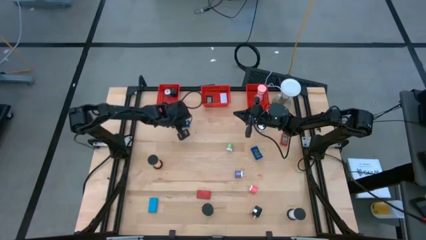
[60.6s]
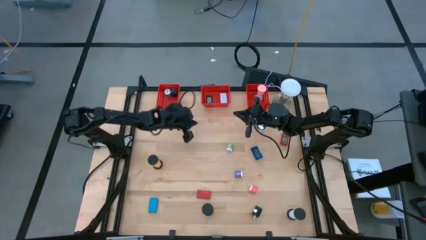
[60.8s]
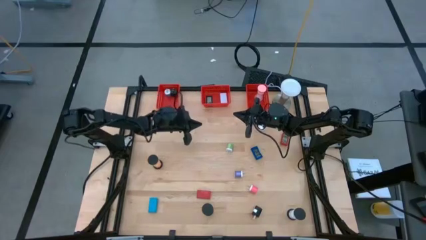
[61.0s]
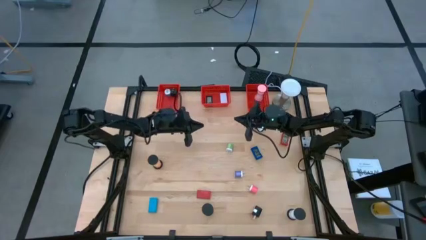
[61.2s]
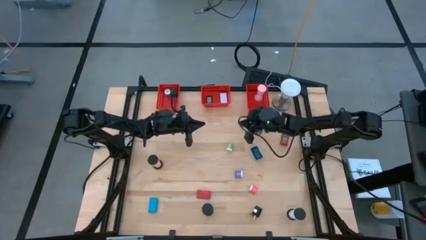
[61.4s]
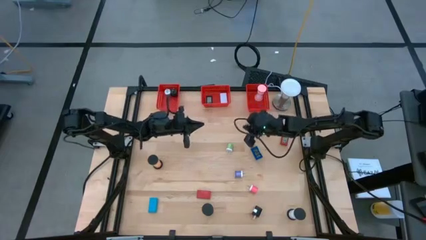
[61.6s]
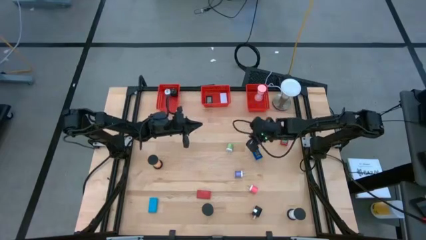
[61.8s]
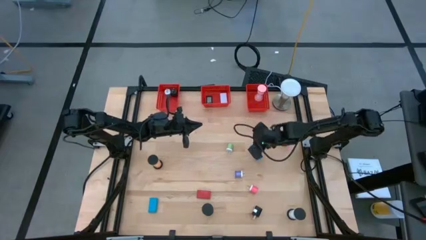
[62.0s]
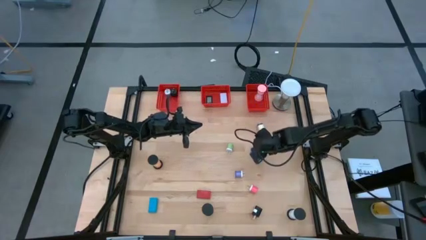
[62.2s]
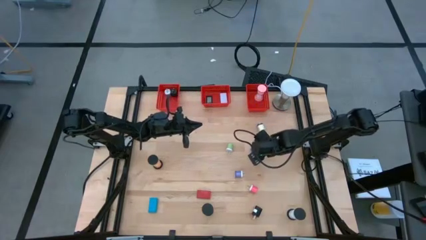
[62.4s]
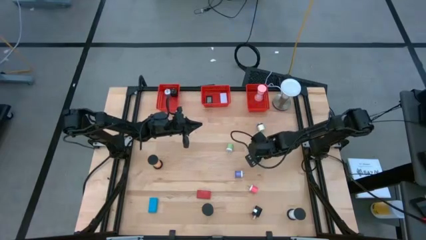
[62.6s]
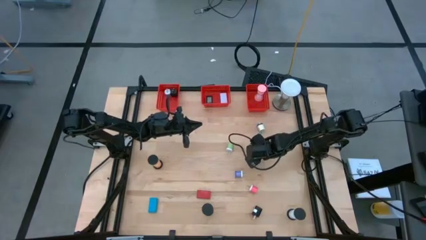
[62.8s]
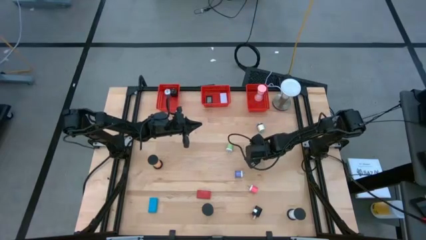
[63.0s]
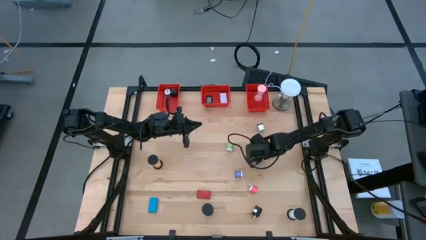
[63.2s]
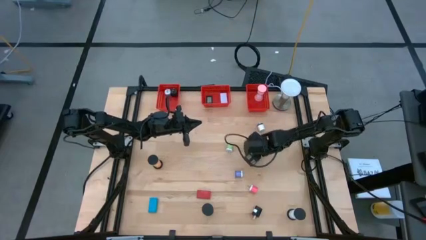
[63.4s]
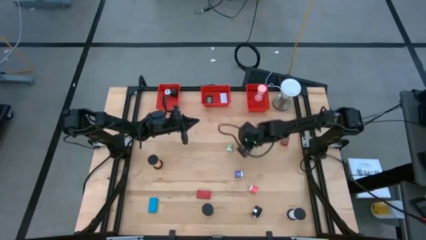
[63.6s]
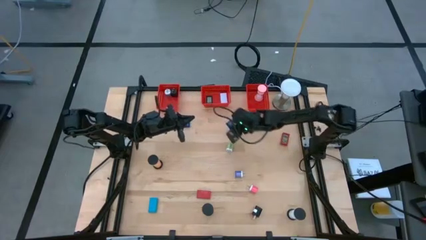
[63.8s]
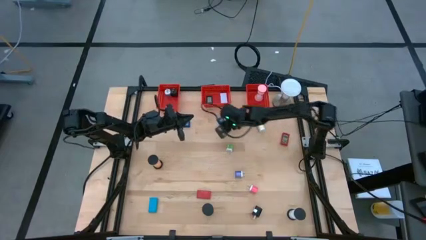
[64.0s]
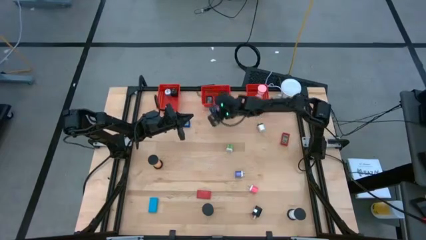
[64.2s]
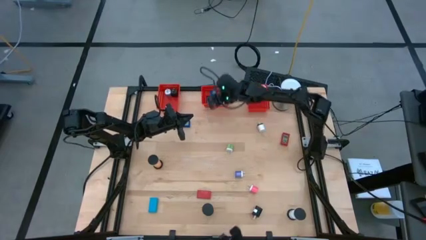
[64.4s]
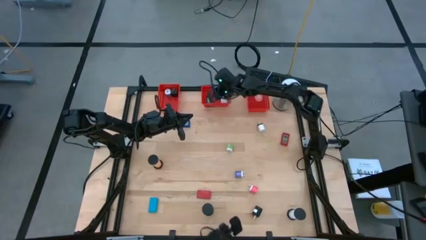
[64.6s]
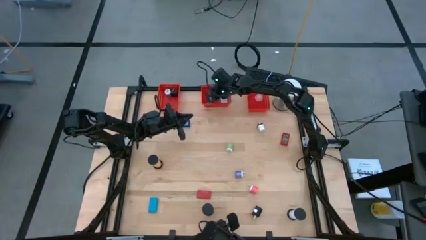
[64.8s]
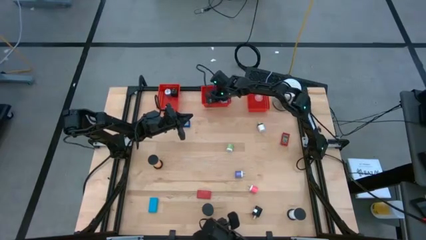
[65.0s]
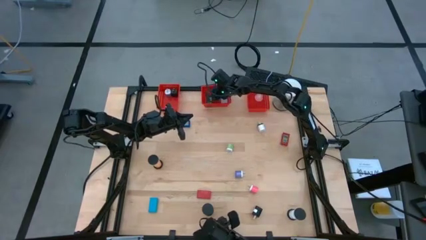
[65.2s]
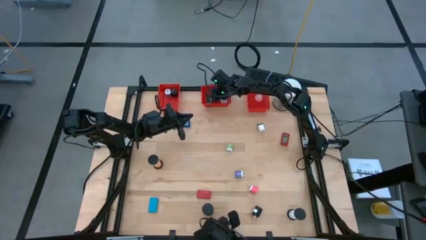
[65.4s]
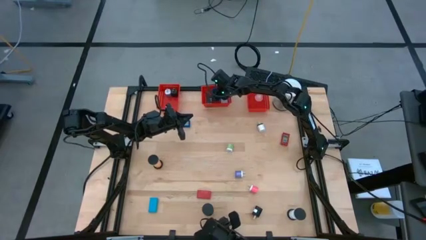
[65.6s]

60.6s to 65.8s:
Task: Pick & Place Office items
Put the blue digital clock into the middle red bin

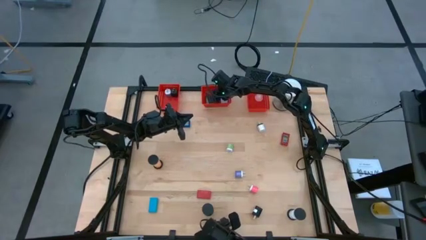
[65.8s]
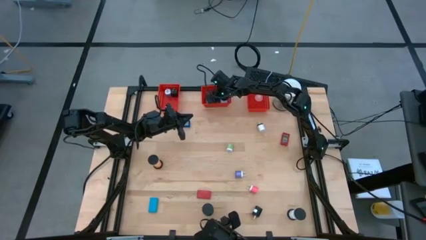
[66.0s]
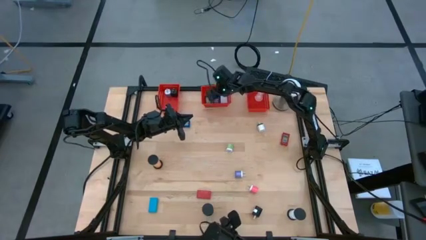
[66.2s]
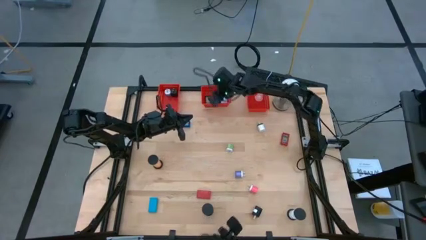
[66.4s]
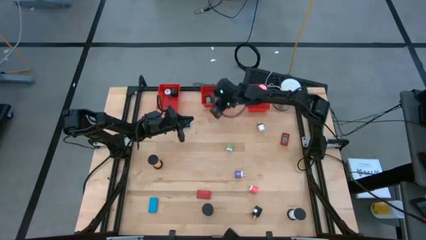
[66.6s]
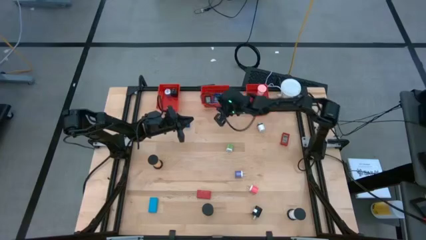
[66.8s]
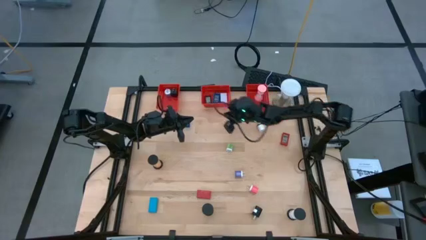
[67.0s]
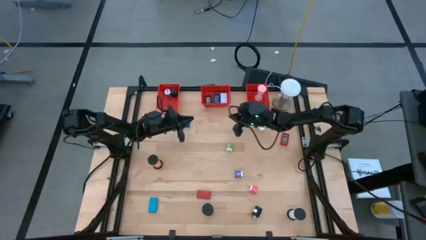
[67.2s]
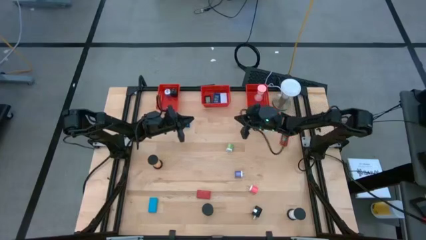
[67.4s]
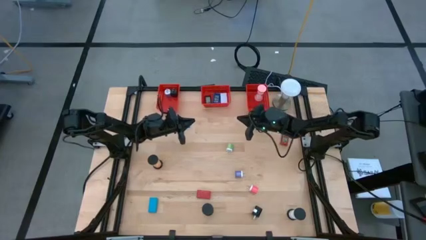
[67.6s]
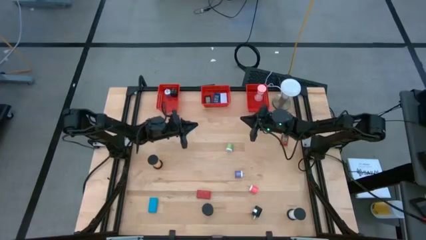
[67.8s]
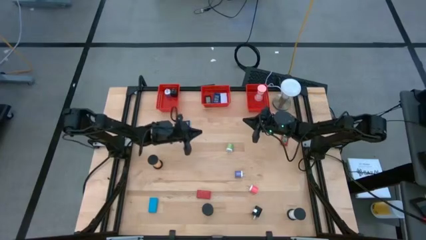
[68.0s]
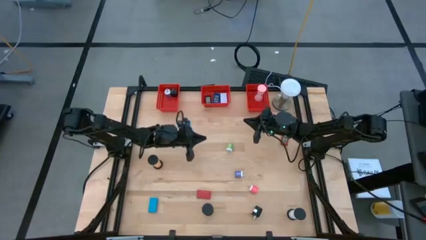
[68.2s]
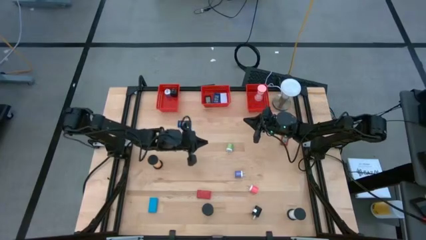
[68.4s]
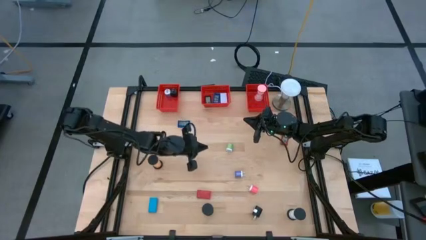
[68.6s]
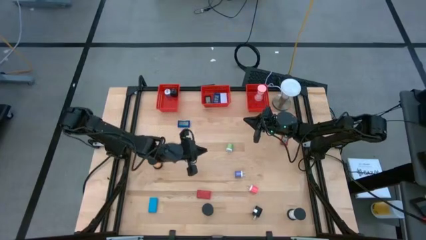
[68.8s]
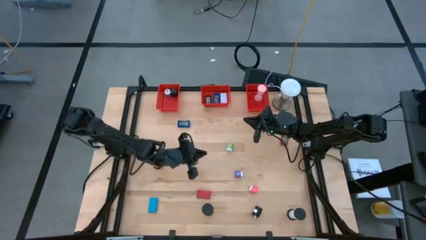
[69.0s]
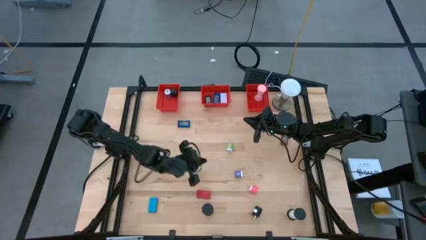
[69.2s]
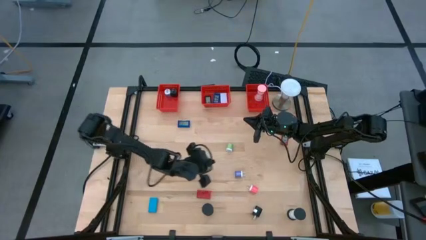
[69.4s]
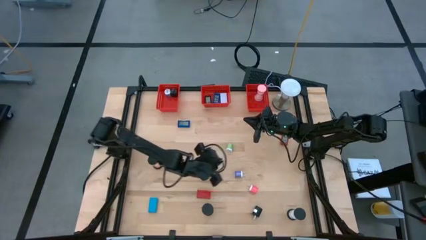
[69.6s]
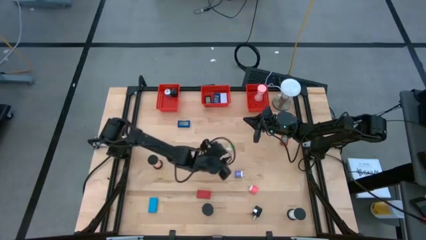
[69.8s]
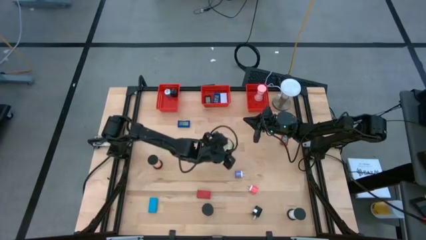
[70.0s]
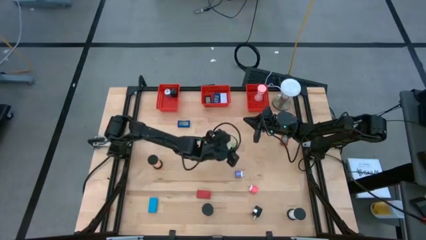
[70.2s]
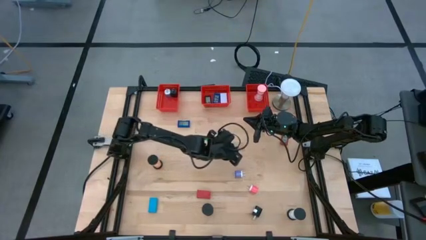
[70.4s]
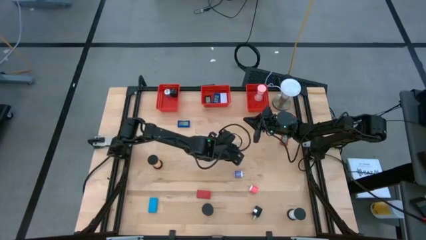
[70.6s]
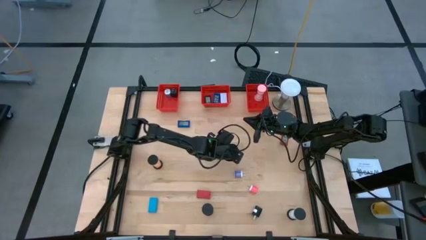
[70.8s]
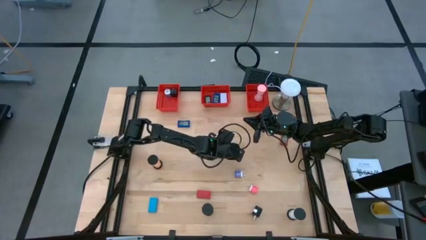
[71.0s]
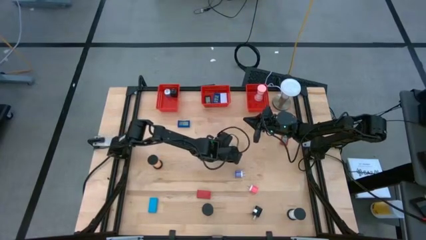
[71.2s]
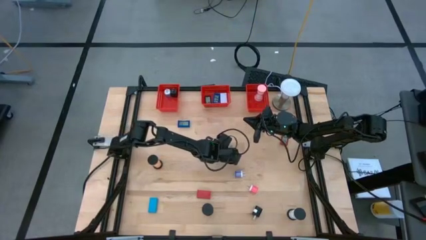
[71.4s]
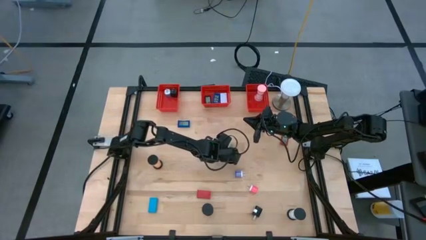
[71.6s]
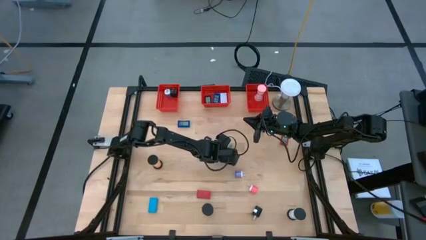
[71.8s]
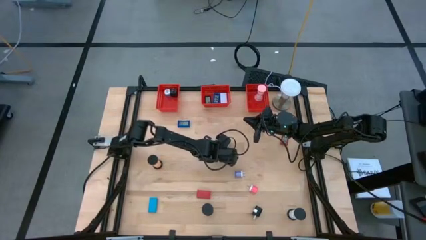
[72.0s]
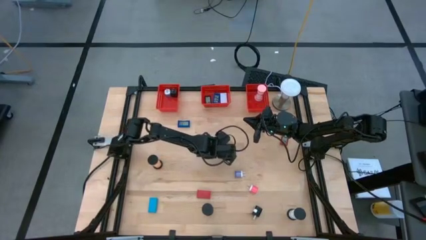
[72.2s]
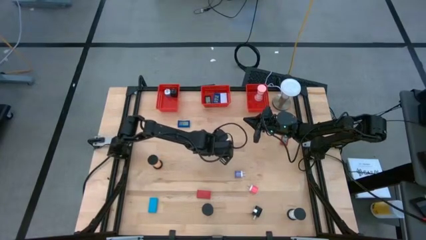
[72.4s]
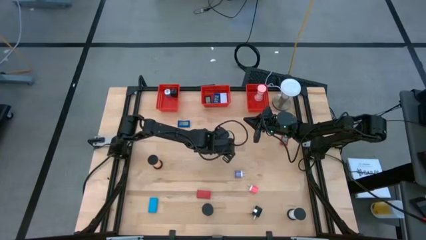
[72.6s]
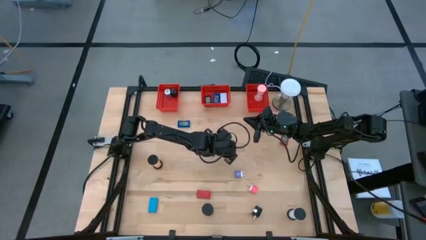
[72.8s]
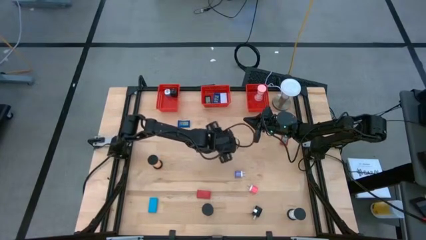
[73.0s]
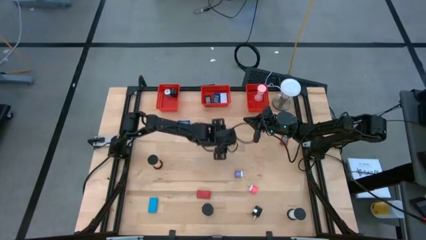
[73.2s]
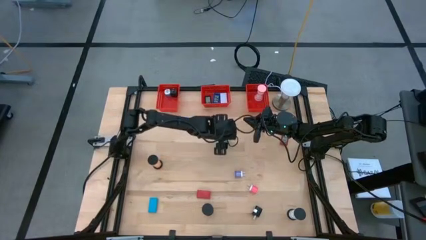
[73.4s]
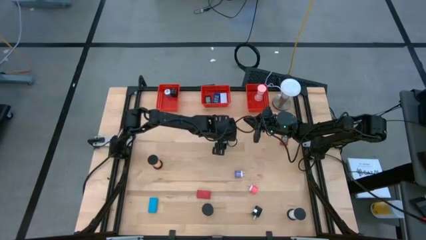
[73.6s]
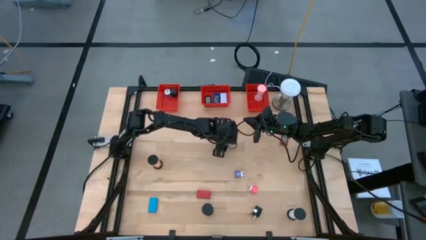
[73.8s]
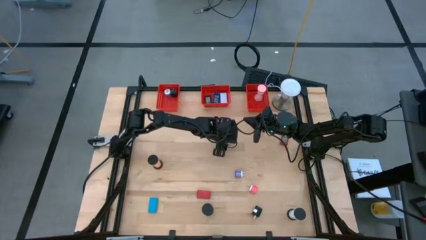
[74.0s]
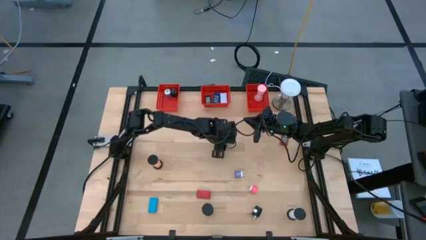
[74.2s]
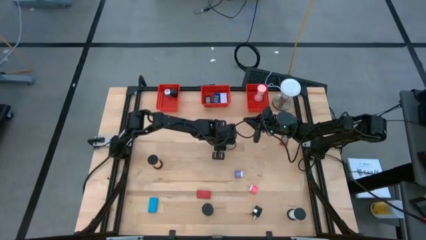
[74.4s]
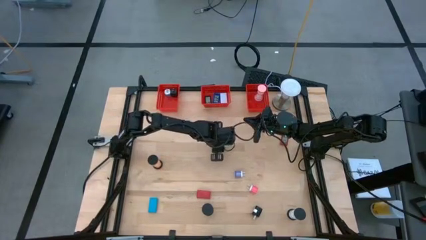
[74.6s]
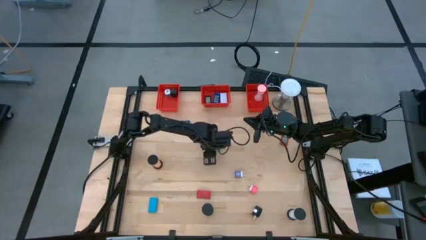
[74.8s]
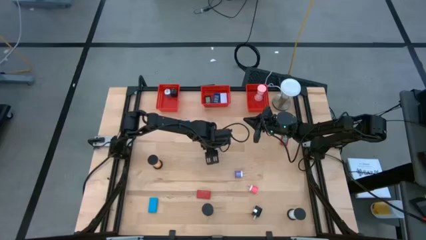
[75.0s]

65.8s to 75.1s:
Put the green charger adapter into the left red bin
